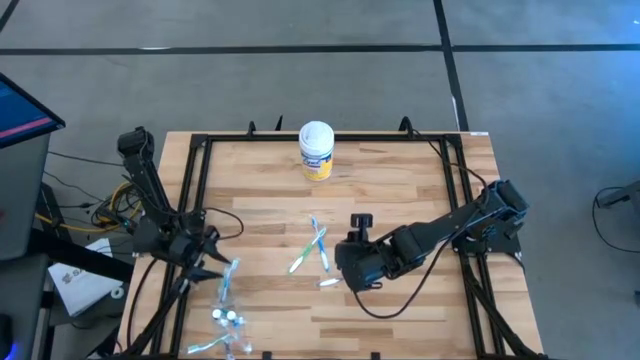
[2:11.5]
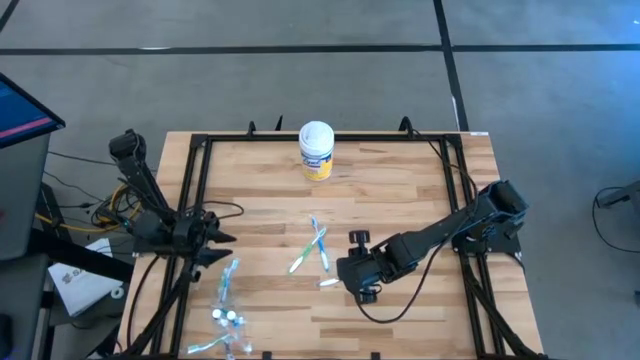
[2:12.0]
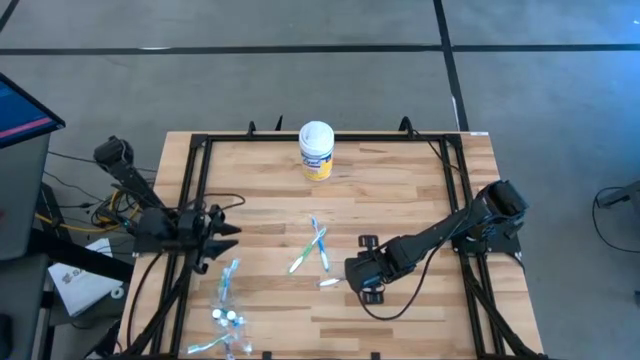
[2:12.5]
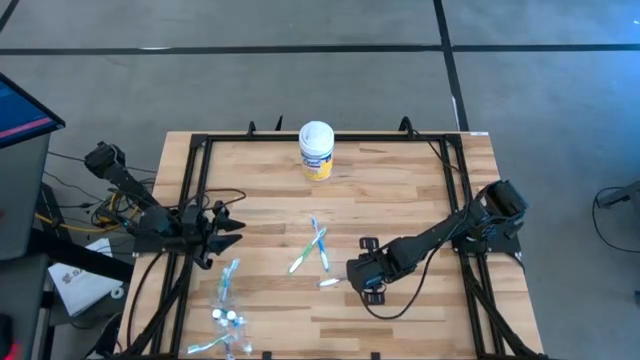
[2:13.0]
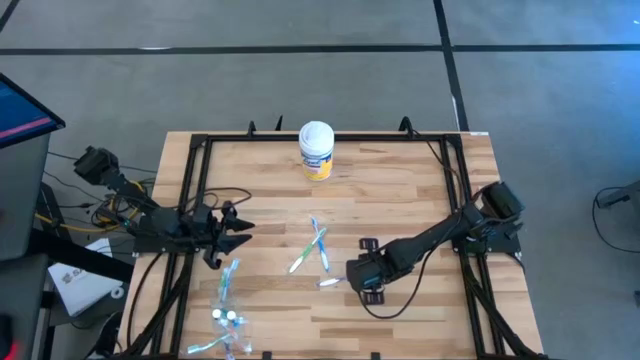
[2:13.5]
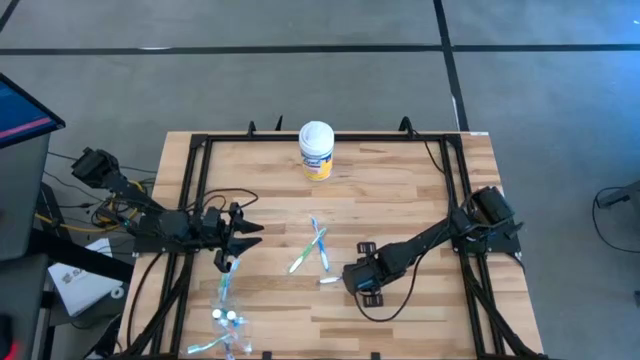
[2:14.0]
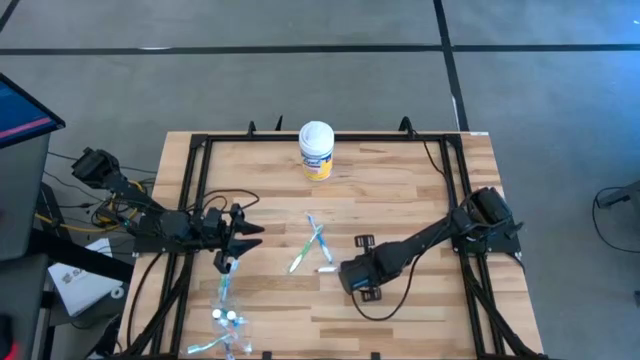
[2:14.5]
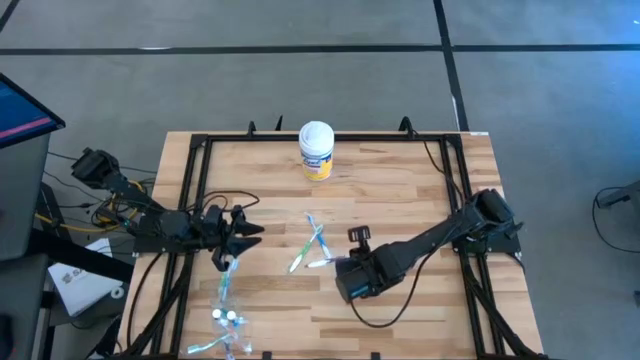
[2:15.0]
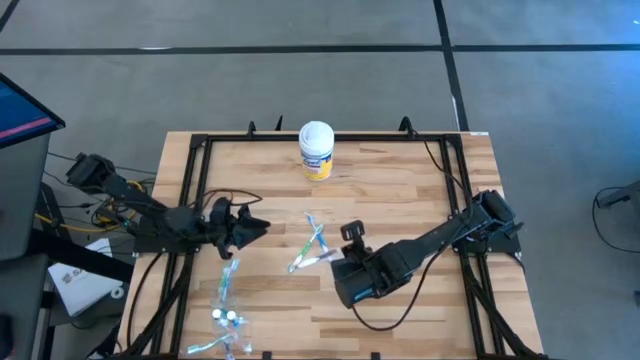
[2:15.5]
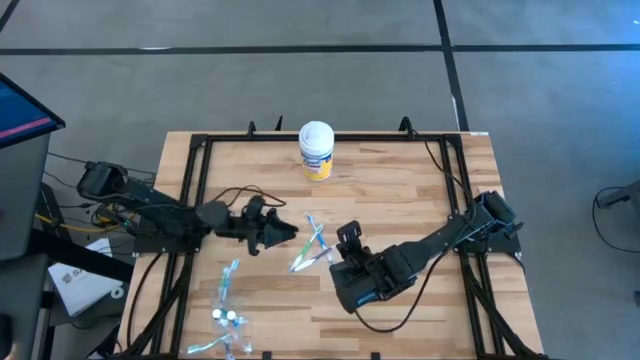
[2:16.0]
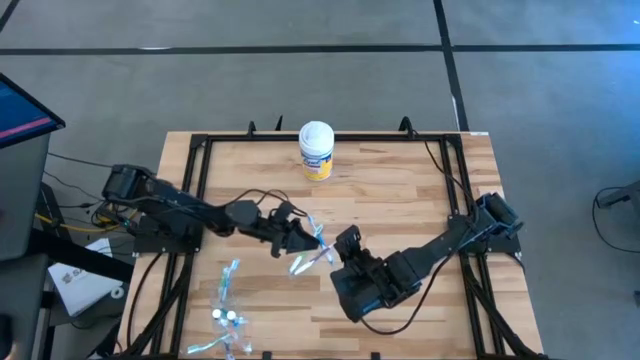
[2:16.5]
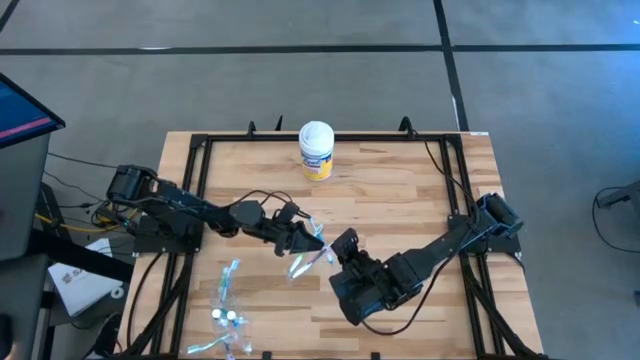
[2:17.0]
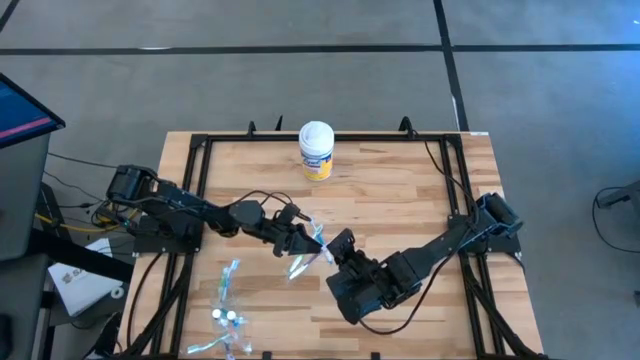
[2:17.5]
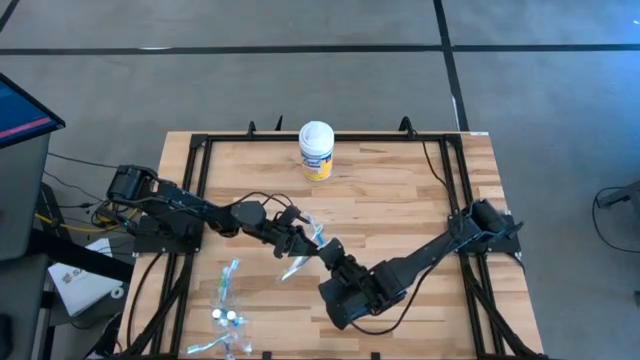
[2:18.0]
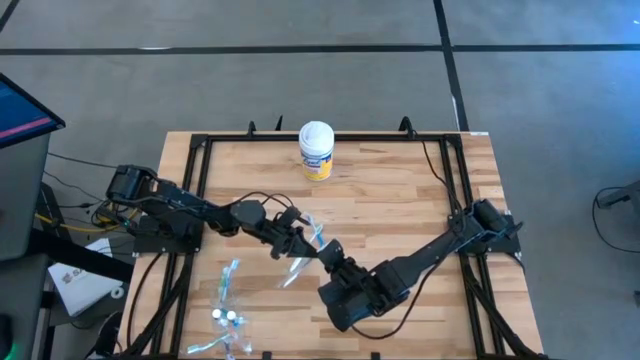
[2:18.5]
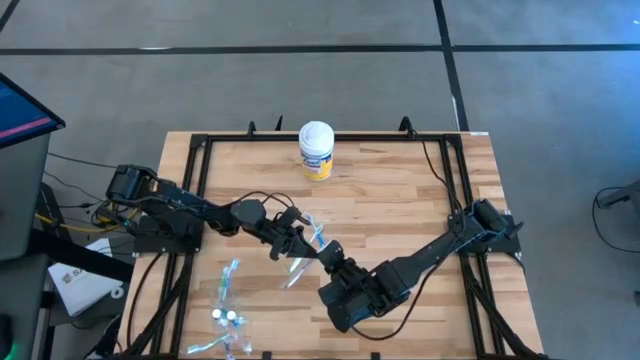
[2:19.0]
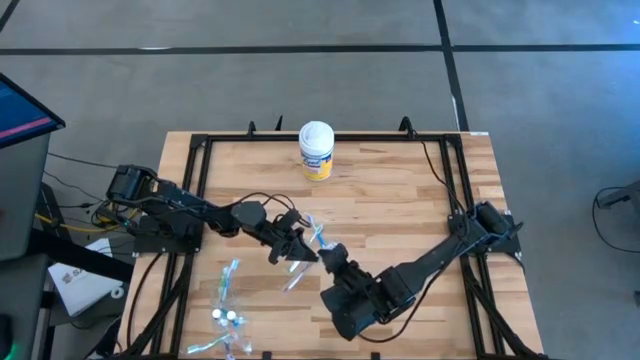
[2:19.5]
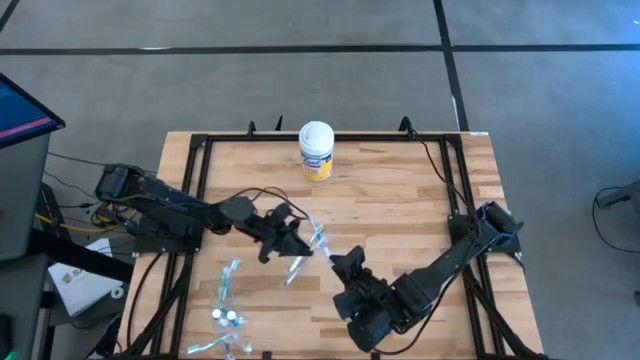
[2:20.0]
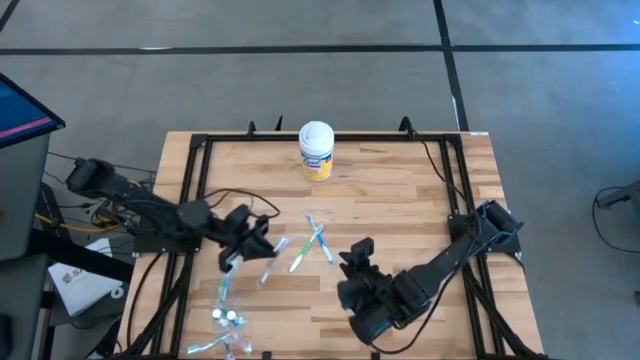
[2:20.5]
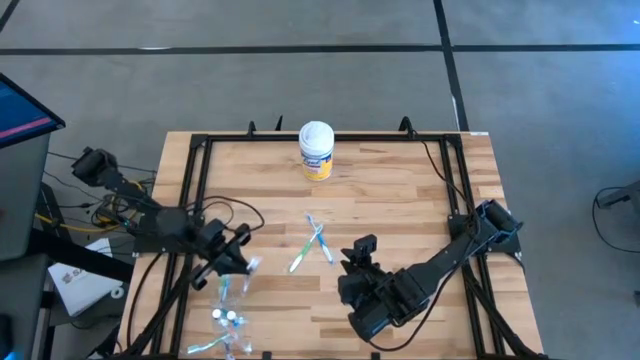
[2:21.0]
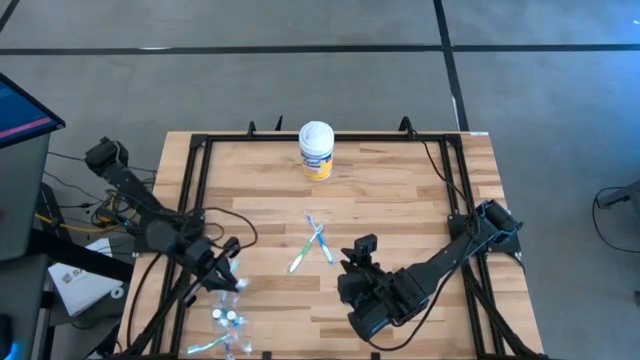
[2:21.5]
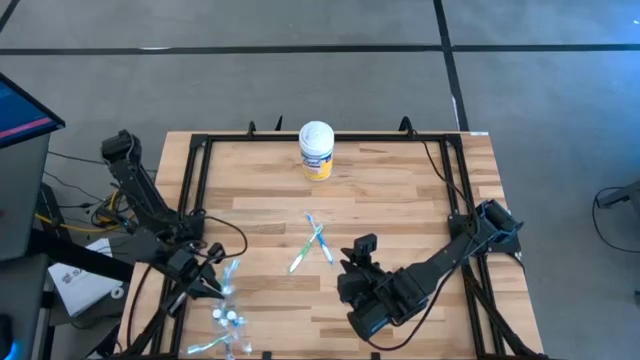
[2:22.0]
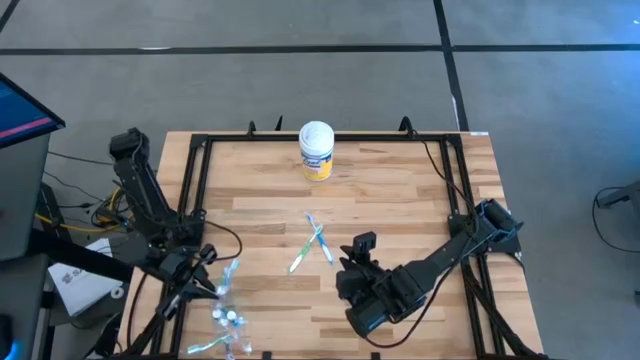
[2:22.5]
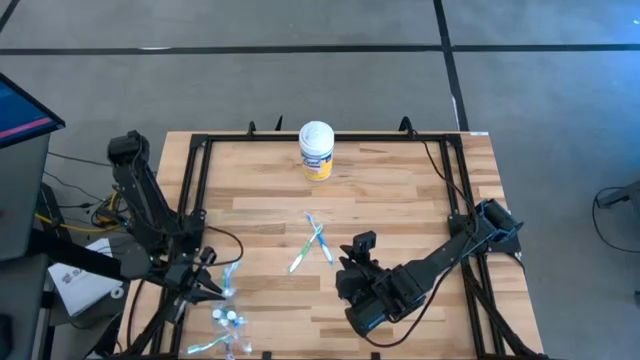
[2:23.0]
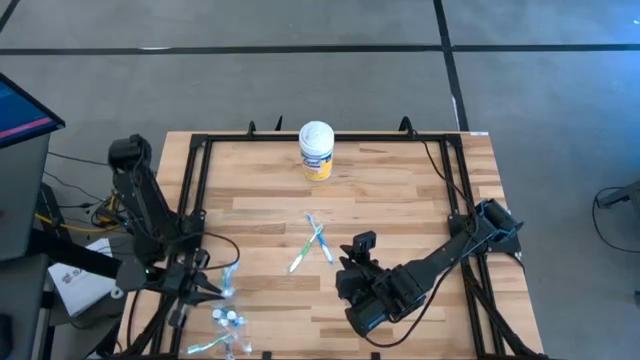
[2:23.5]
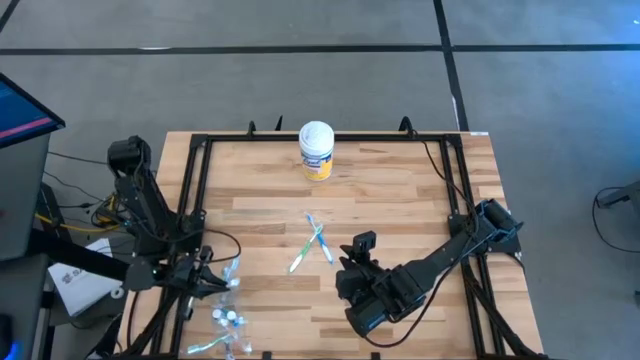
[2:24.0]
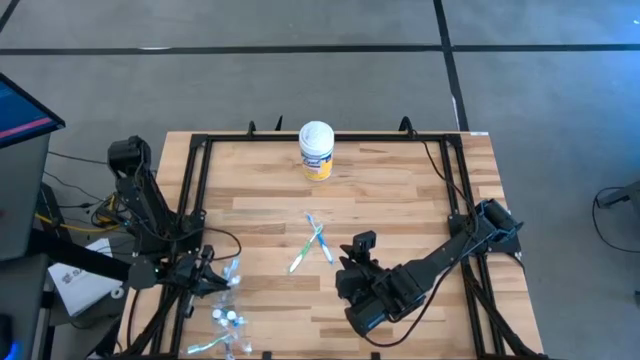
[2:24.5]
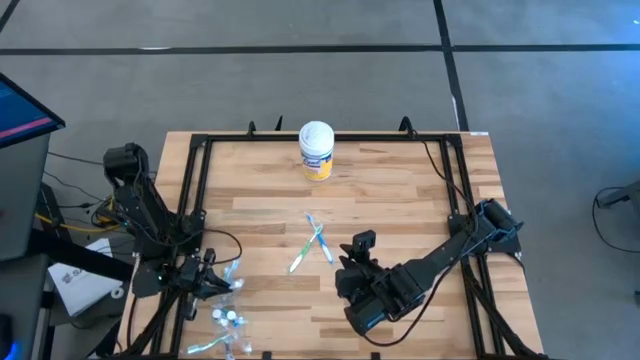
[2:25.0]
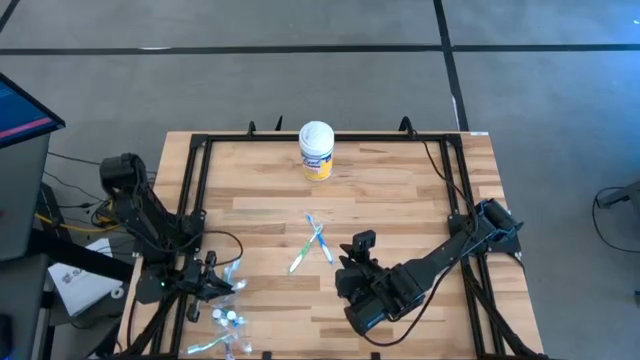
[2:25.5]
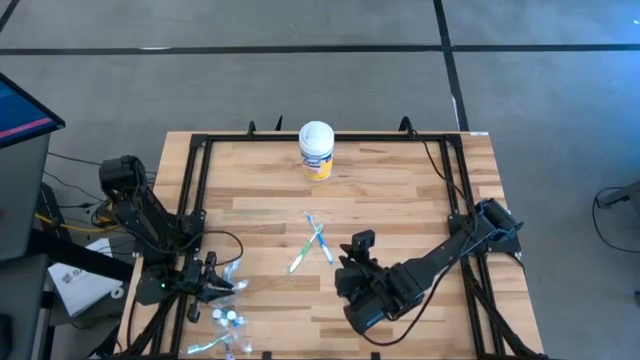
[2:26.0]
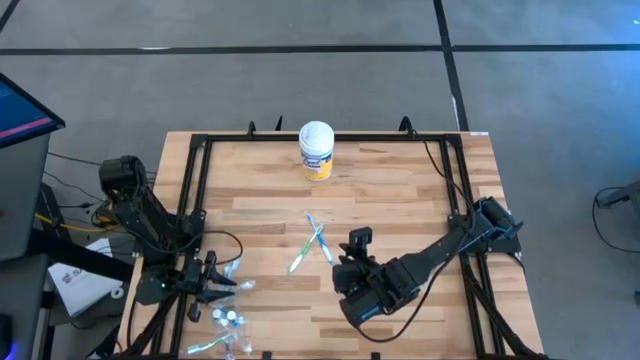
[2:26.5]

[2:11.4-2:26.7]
Task: Pick & Place toothbrushing station
Put the purple toothbrush into the transparent organizer

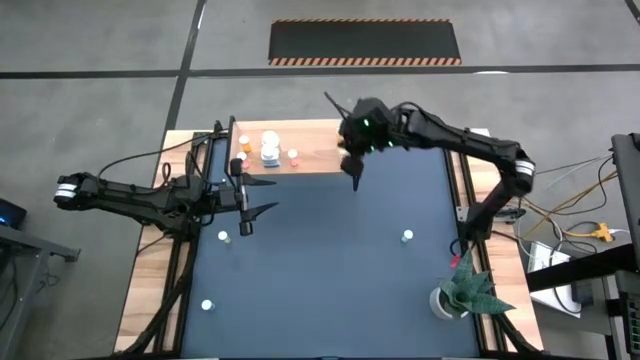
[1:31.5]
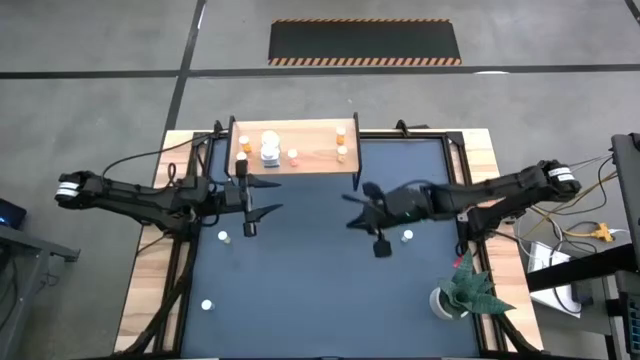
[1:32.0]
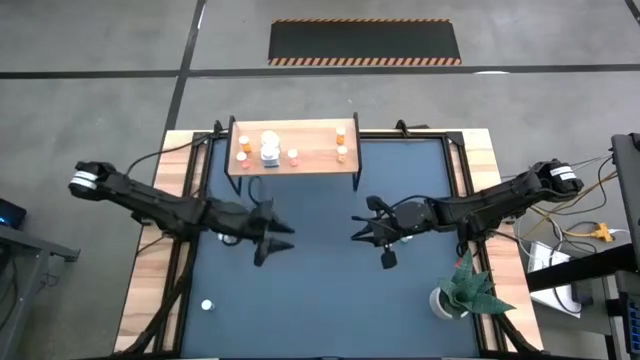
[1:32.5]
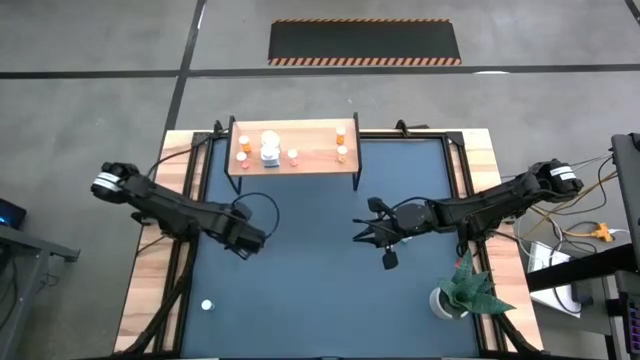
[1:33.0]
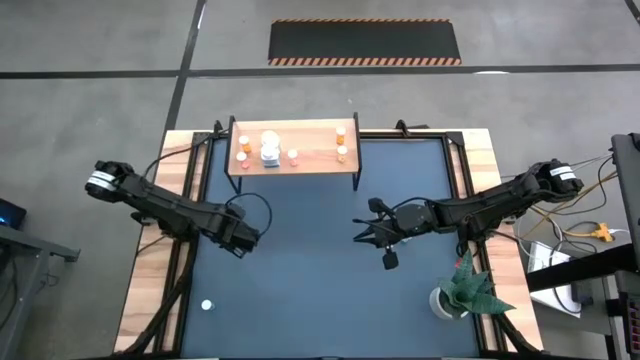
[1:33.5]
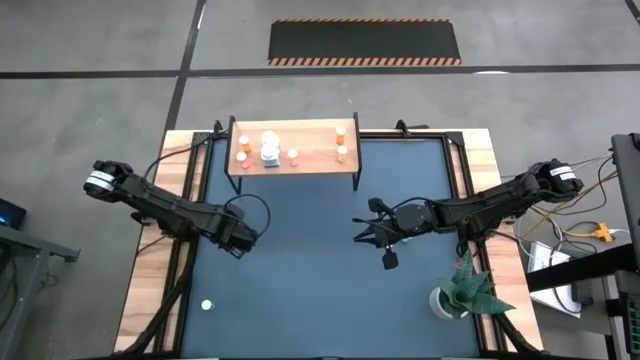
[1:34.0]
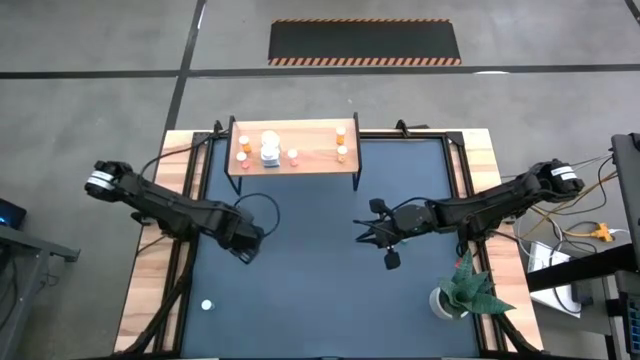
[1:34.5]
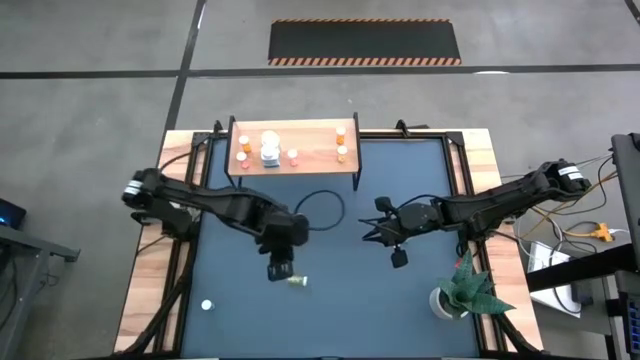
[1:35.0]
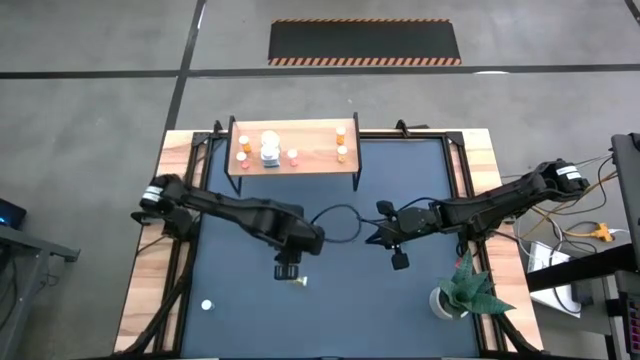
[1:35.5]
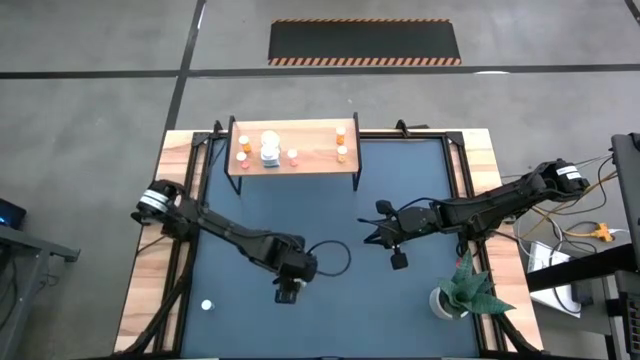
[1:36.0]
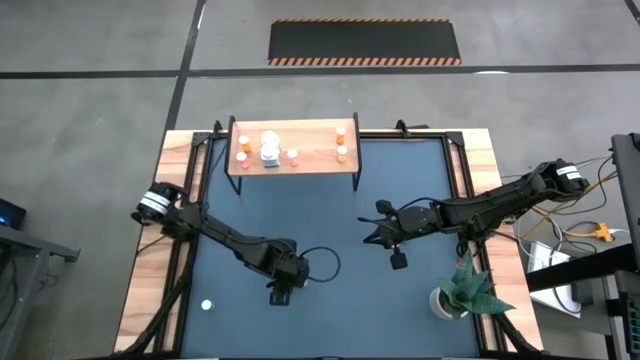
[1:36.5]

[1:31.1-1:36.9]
Task: Pick and place medicine bottles onto shelf by color
Put the green pill bottle on the shelf
